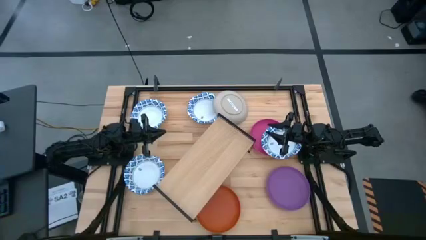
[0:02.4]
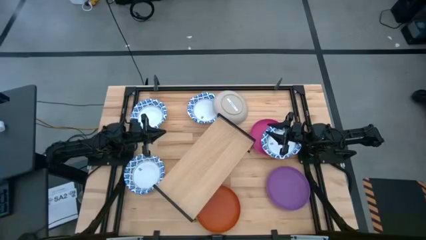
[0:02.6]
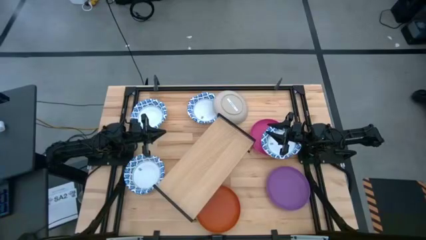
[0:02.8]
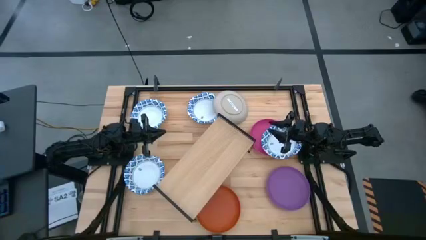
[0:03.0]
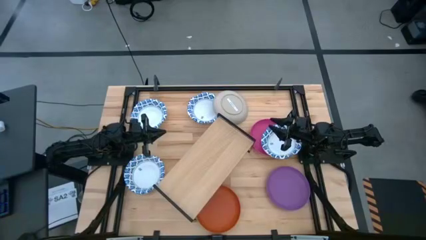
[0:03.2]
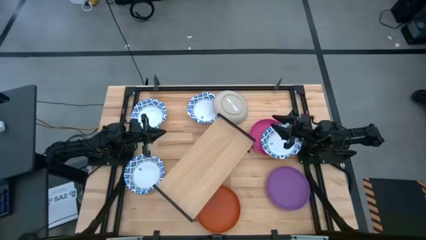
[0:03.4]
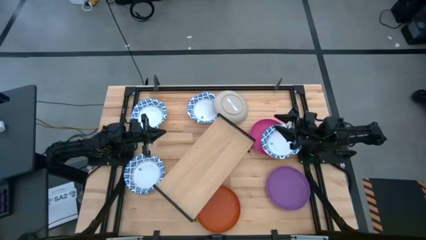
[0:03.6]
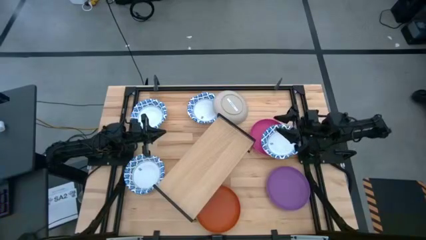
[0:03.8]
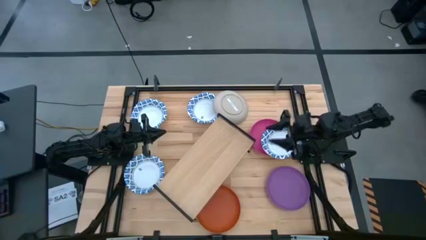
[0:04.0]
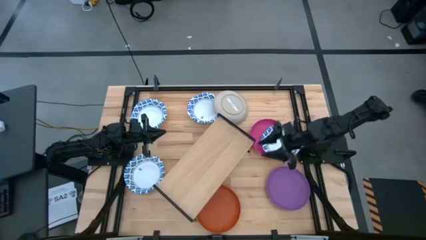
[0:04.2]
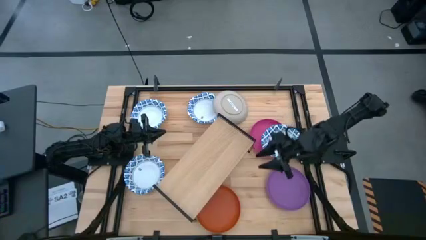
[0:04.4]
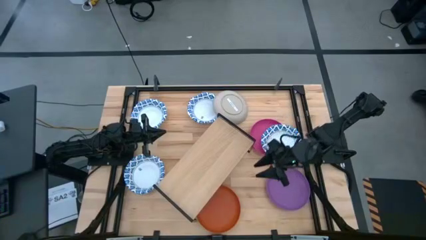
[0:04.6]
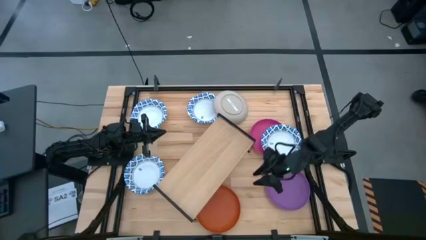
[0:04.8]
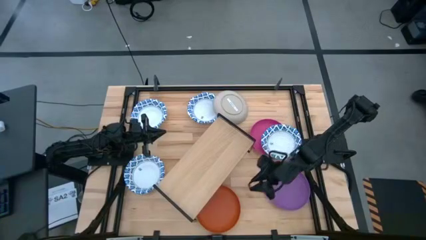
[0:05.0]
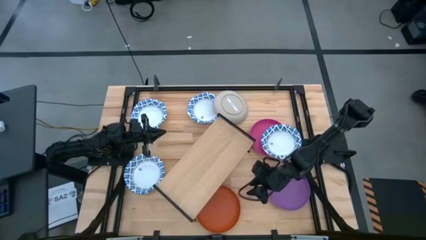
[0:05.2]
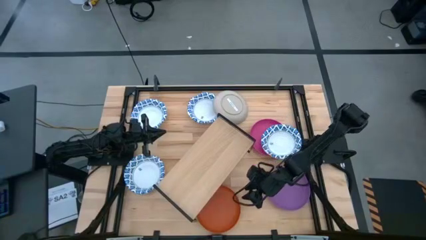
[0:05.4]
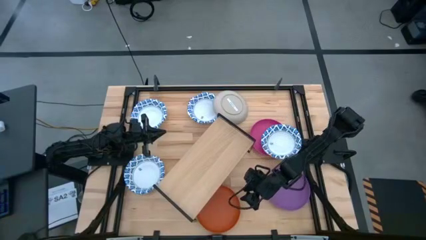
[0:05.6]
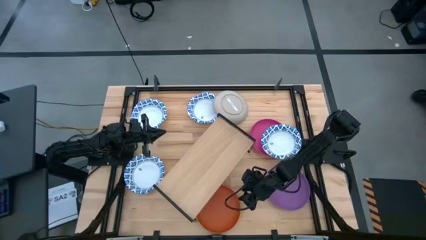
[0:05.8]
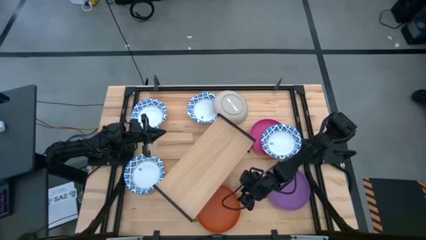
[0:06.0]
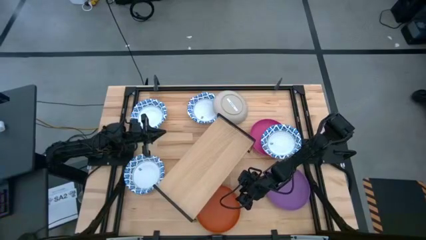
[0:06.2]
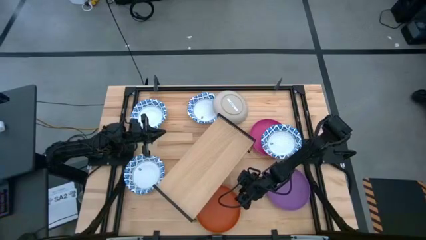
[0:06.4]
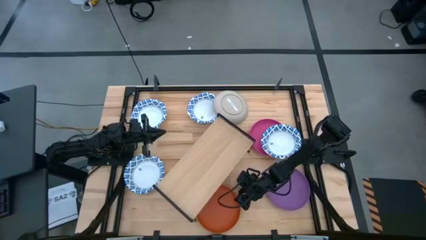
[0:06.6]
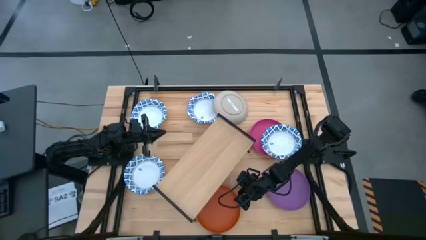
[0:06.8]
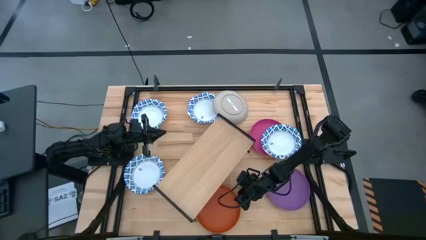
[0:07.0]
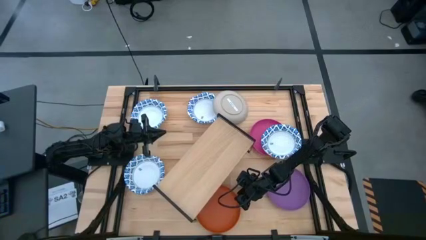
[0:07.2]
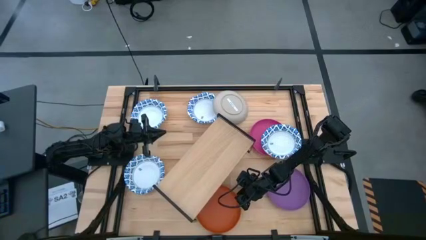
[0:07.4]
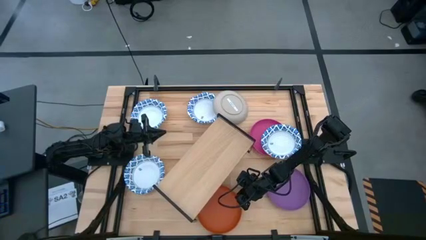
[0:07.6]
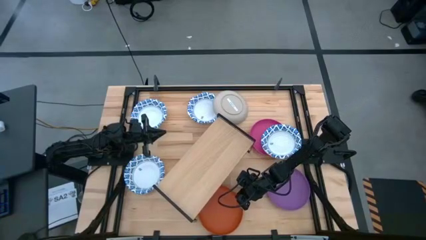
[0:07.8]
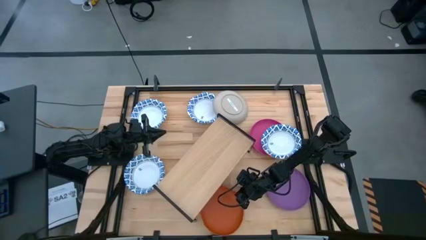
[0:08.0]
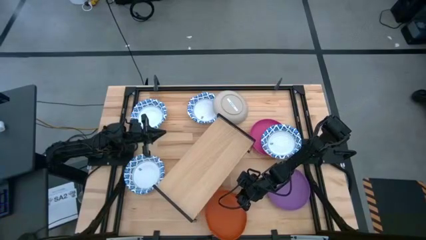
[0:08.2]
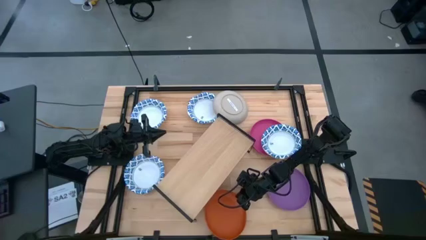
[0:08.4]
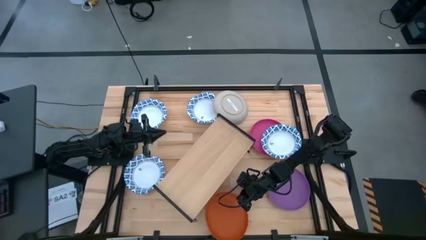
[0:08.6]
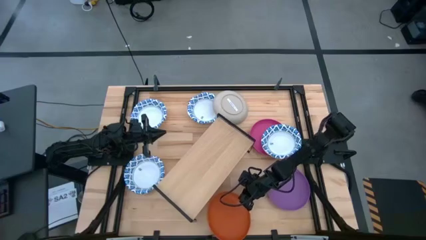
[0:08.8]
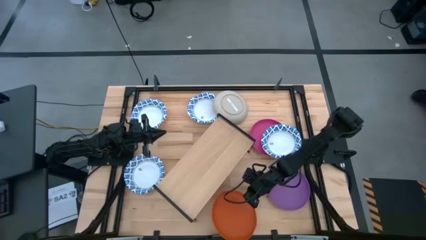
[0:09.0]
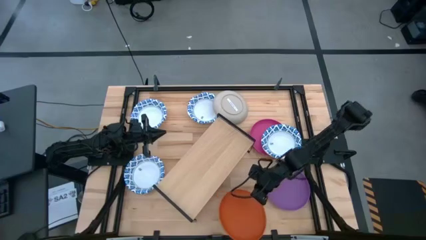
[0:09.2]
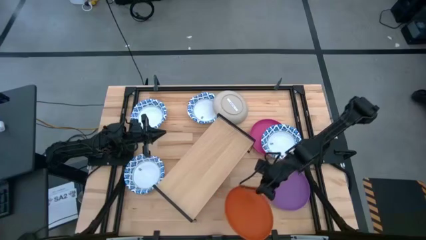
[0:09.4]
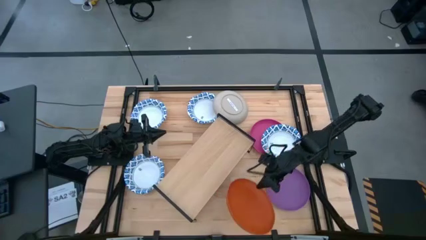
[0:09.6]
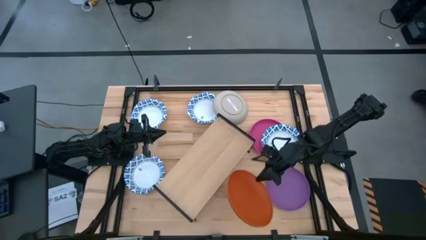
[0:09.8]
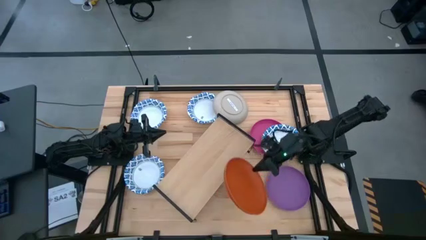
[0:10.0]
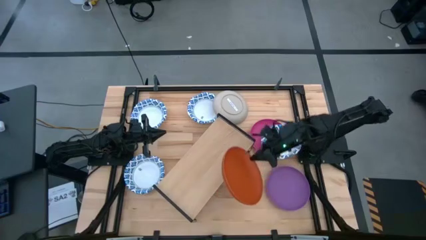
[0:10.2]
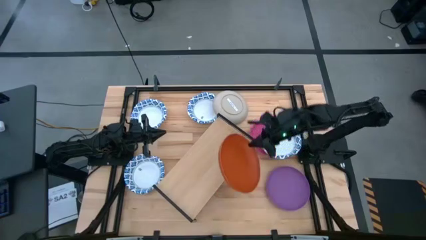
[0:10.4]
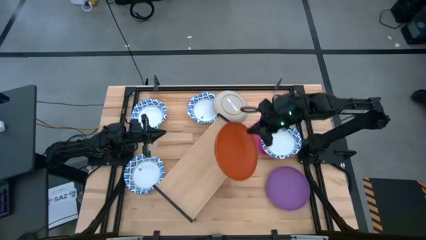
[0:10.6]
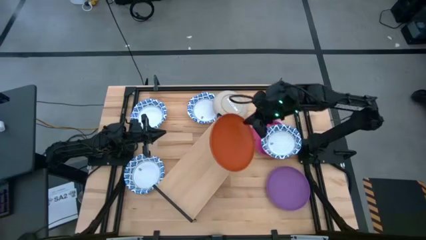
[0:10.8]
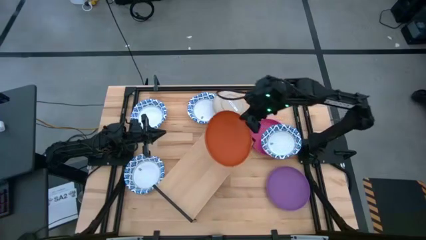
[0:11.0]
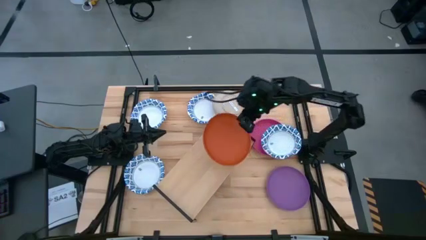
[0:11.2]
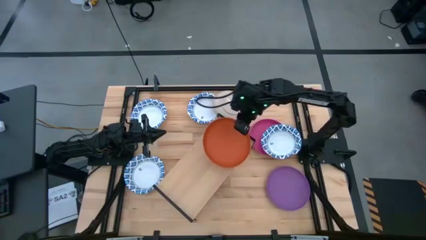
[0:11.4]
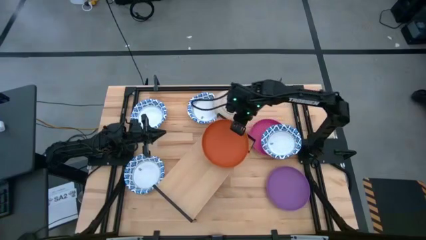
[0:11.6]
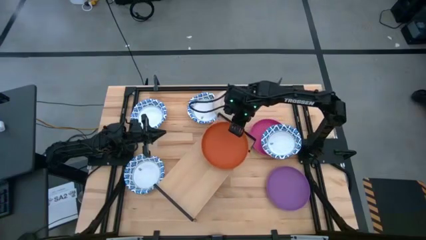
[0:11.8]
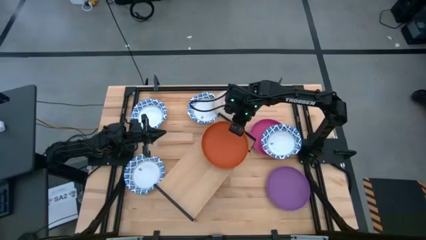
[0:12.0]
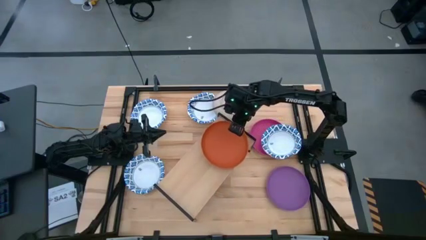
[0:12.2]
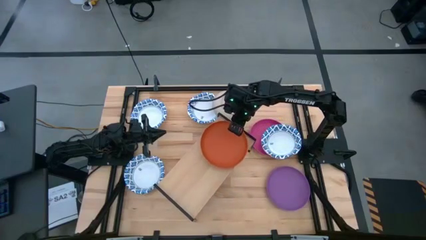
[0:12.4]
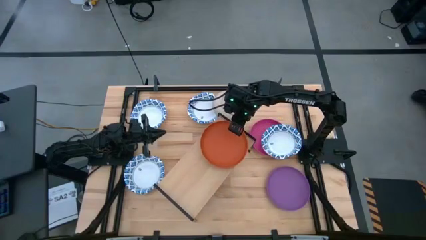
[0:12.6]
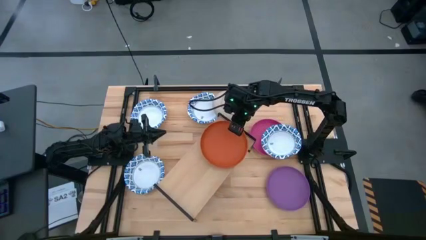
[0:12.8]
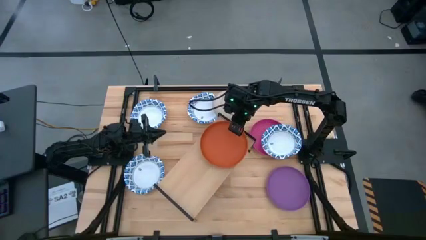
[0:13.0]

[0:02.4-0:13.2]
Task: Place and stack plates onto a shelf
Put the orange plate on the shelf
